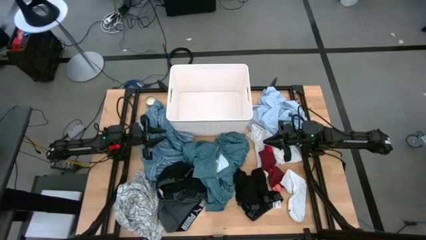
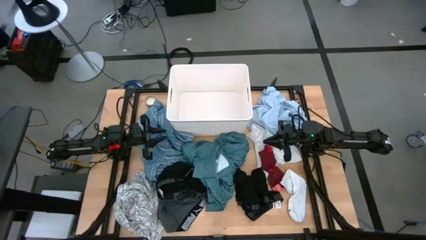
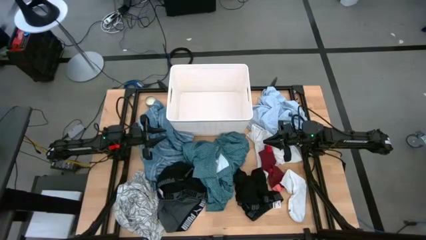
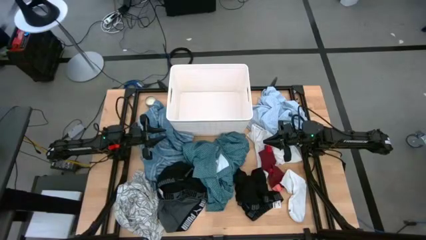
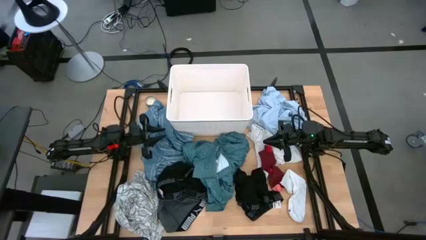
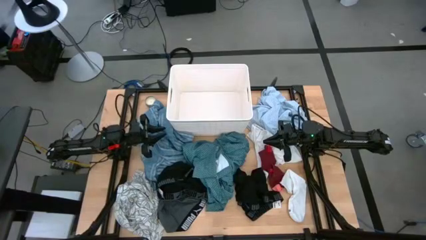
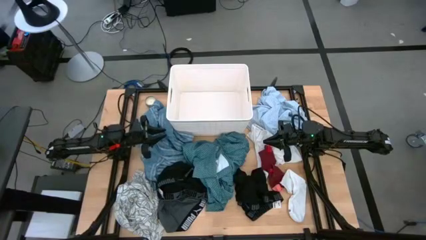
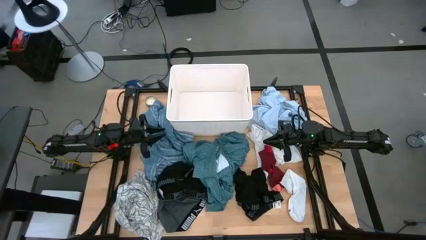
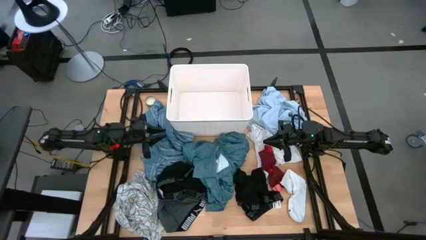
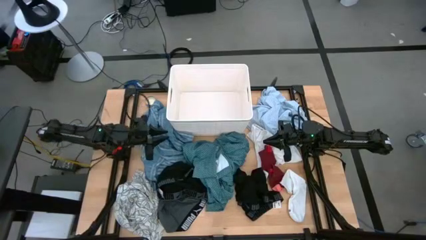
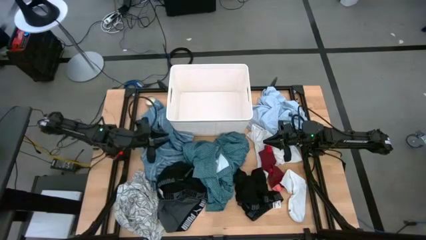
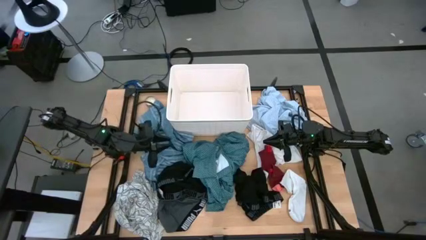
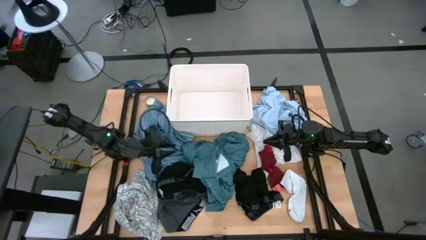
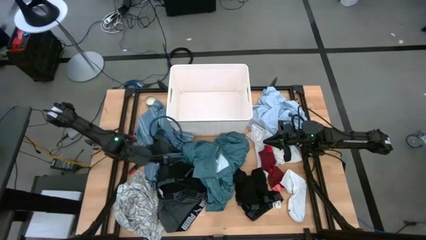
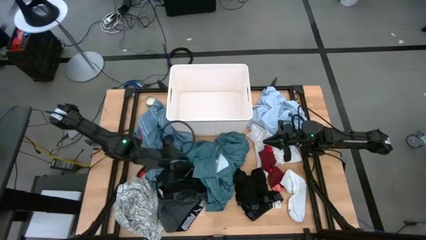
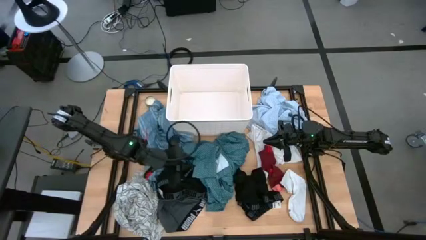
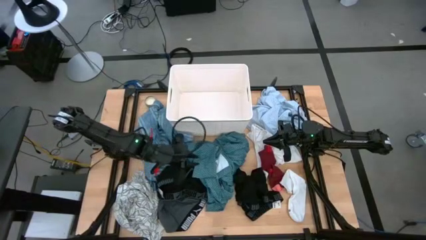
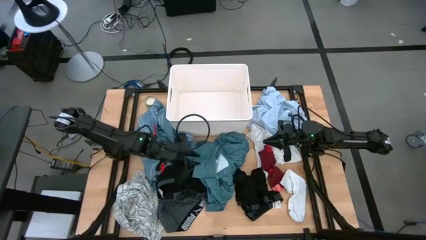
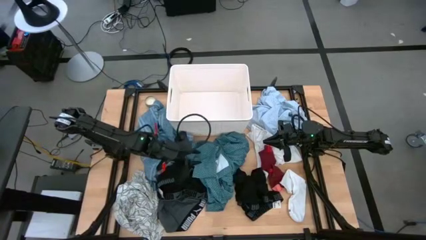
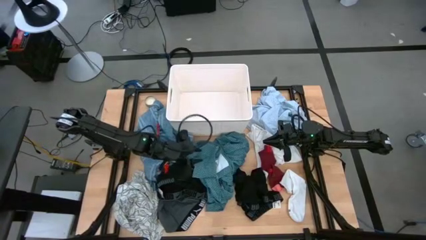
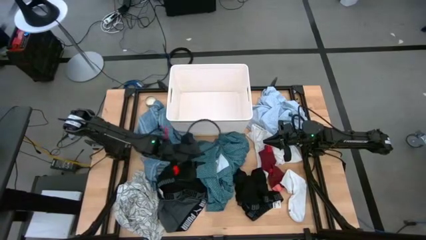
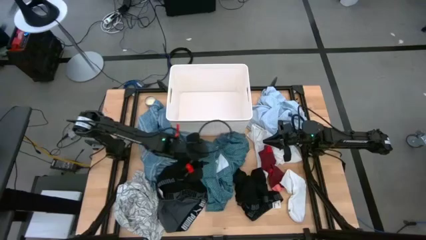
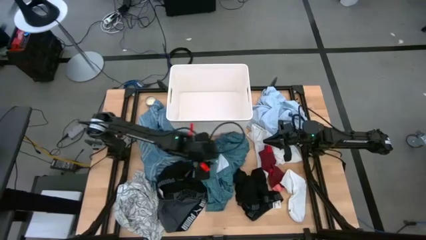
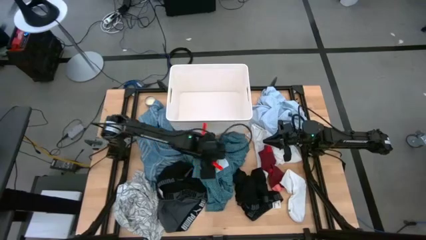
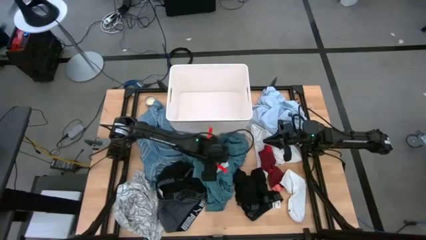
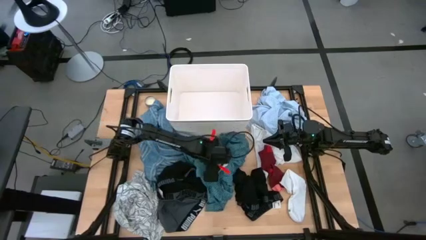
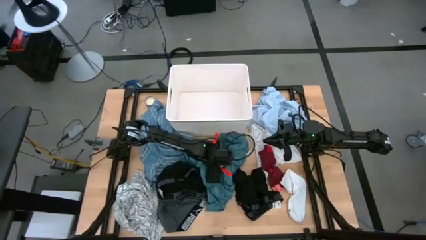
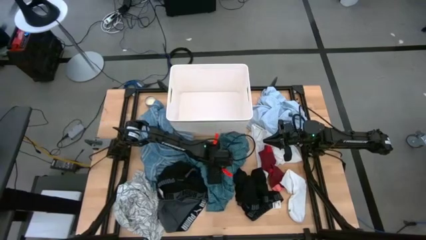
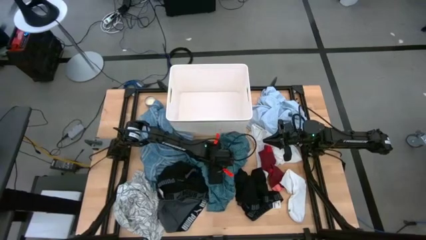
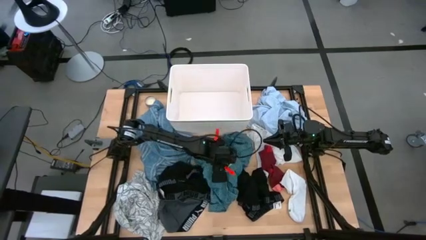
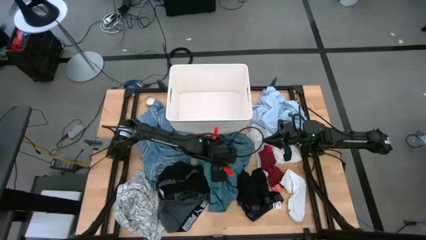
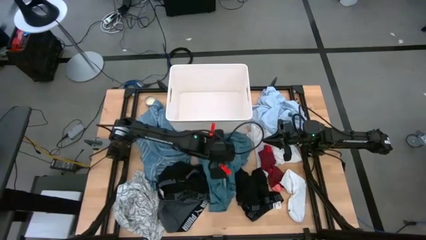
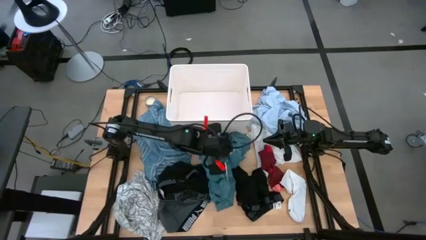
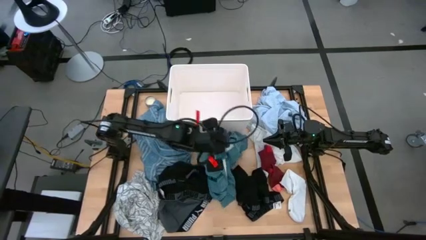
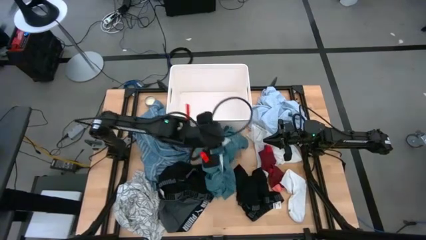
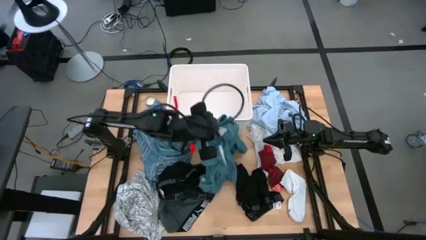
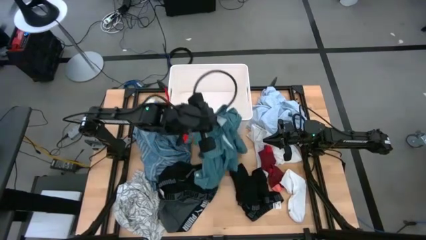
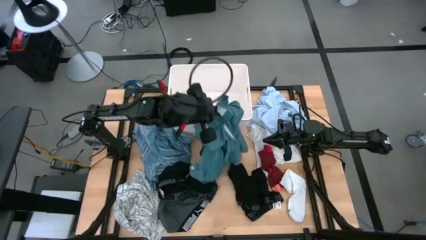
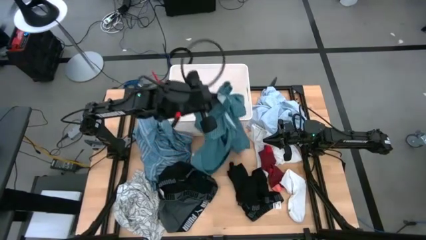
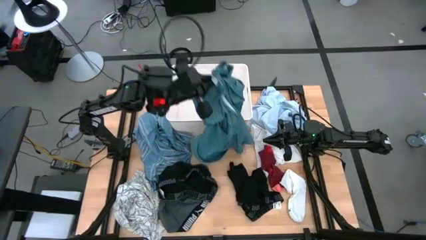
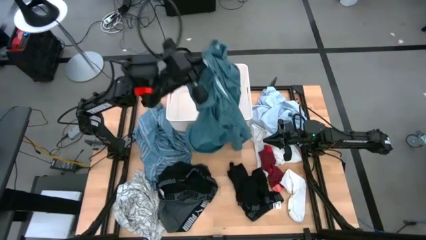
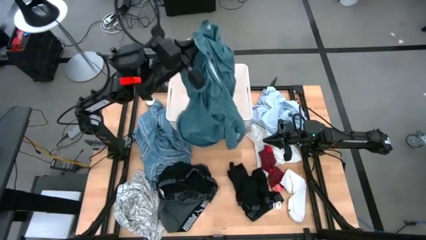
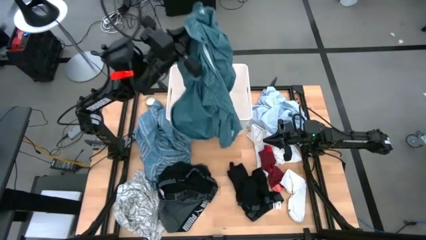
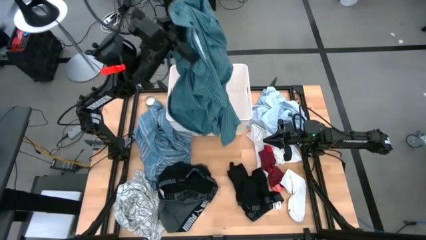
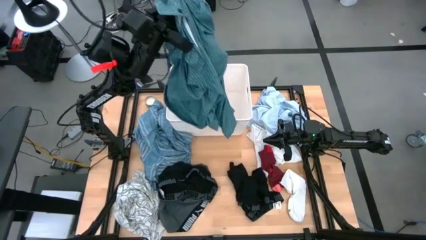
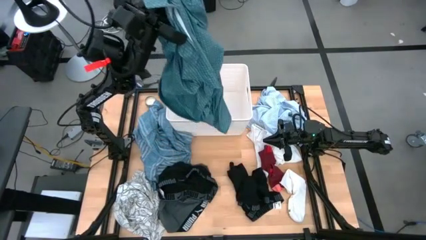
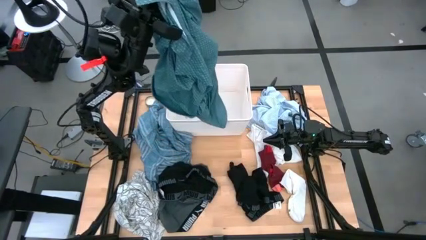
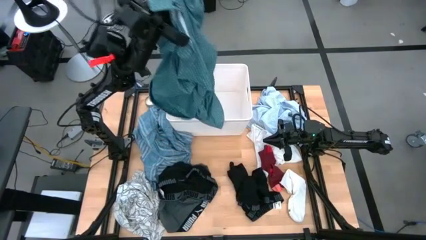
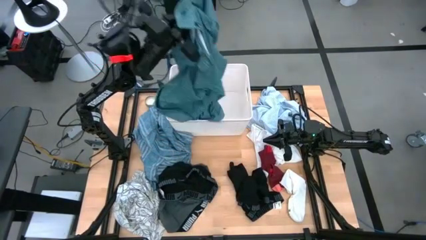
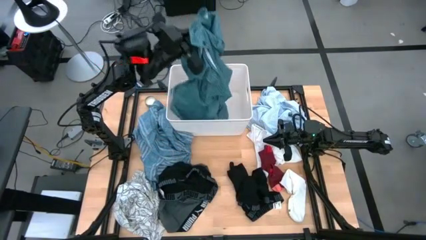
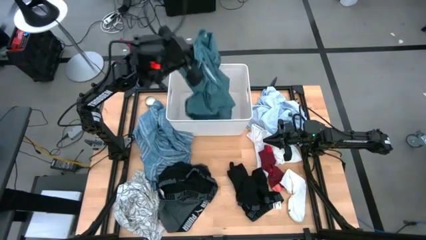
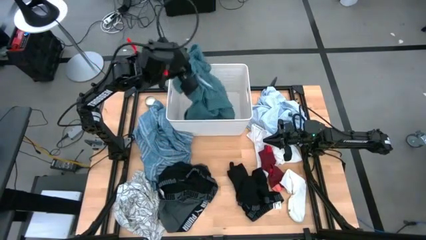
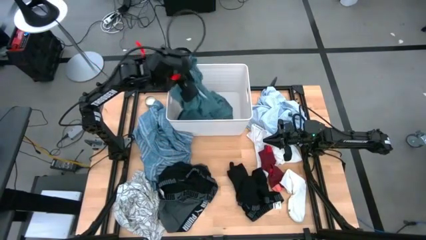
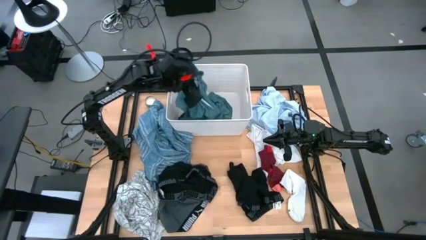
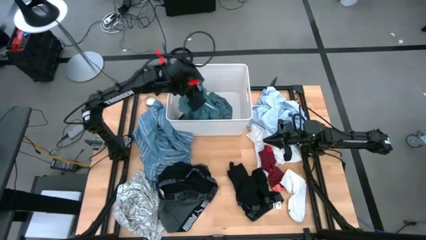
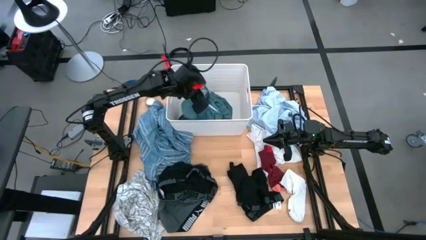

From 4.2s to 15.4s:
Task: Sort clothes
Put the green polo shirt into the laundry bin

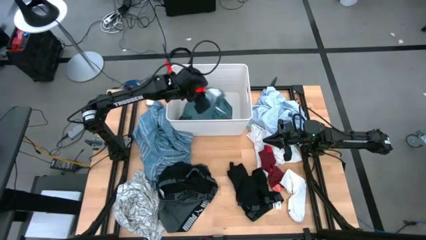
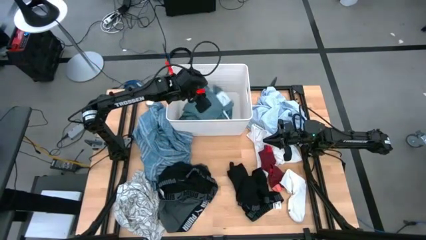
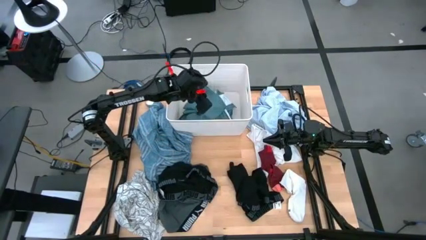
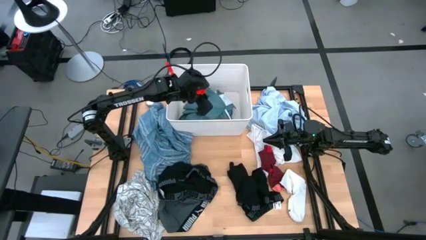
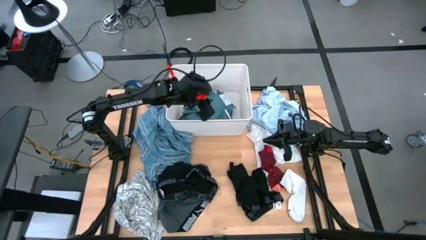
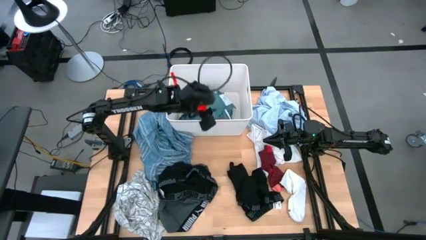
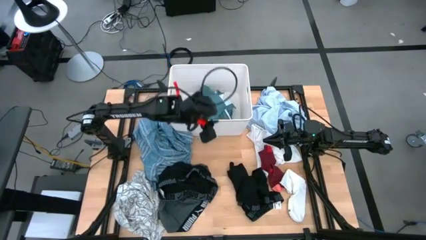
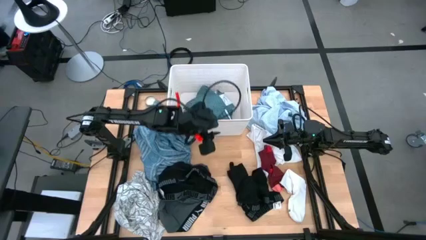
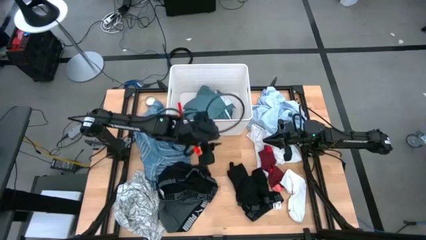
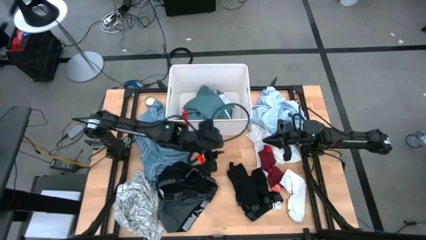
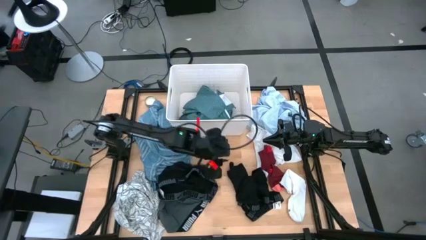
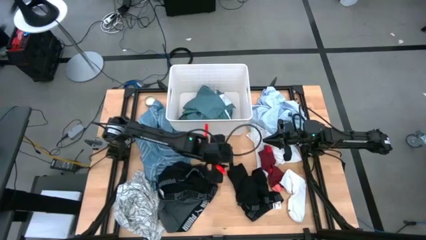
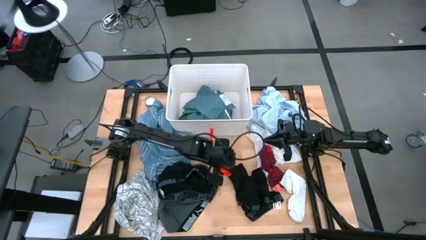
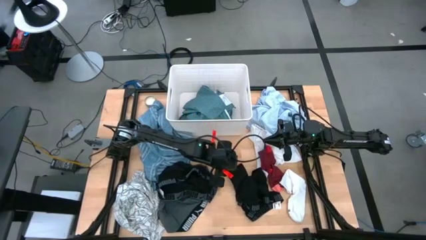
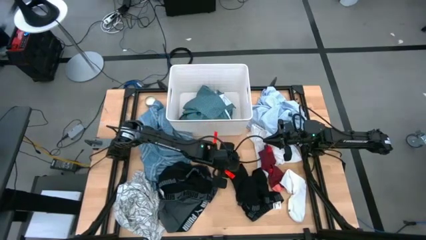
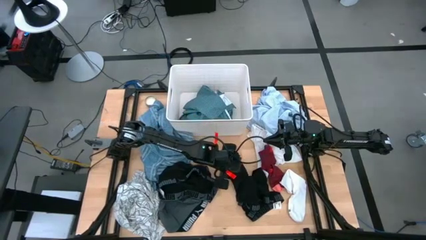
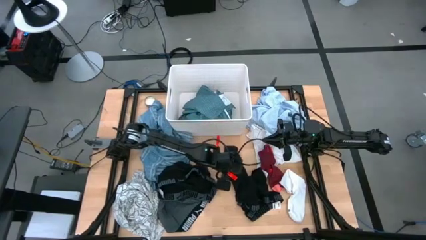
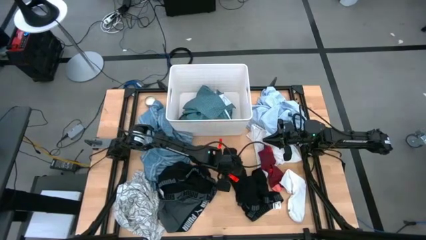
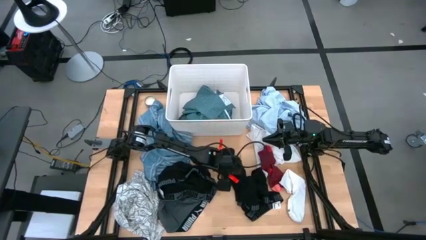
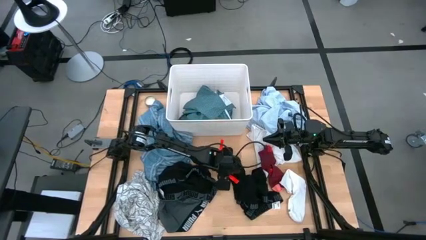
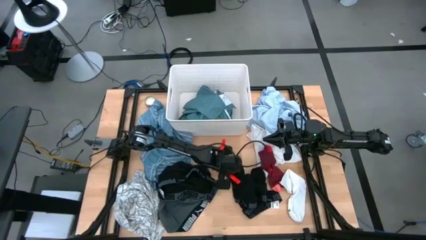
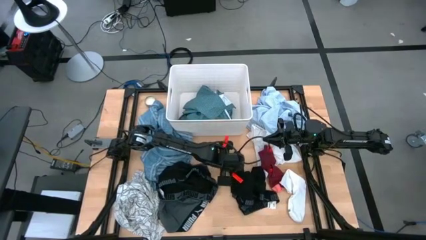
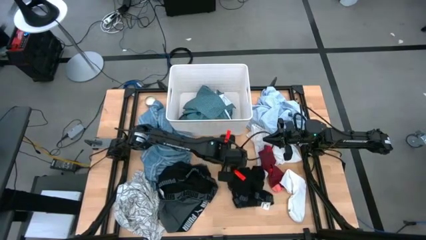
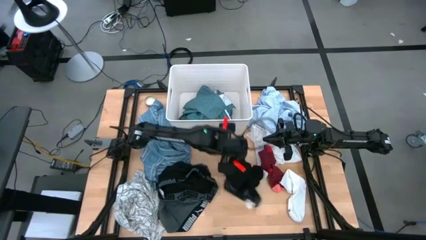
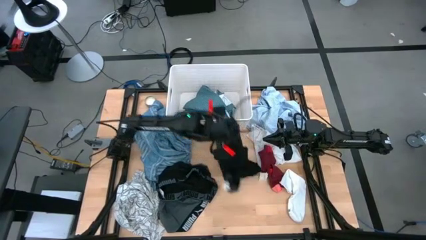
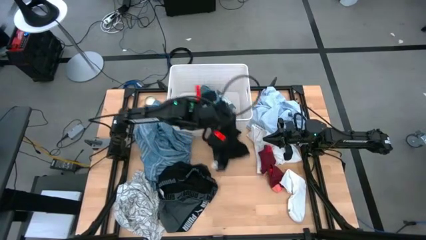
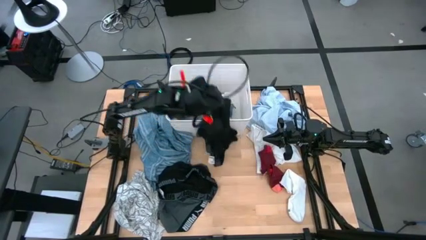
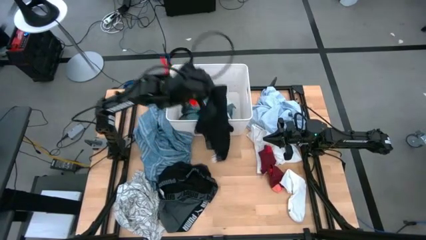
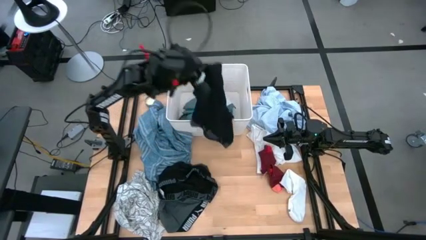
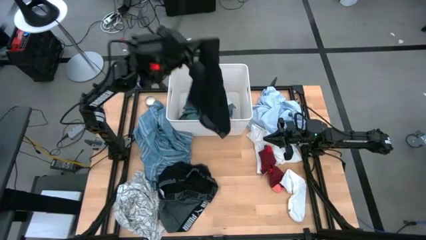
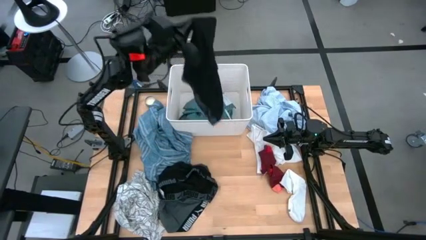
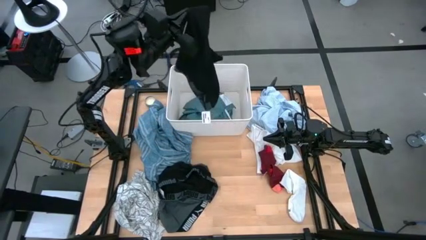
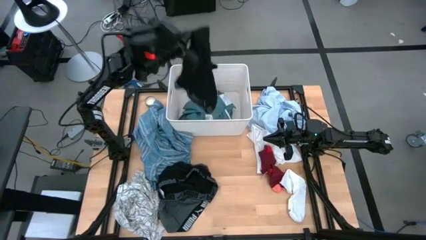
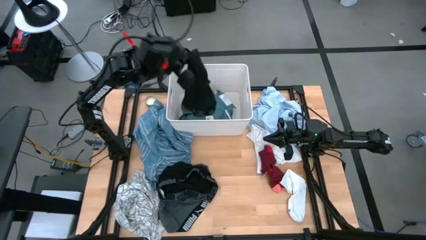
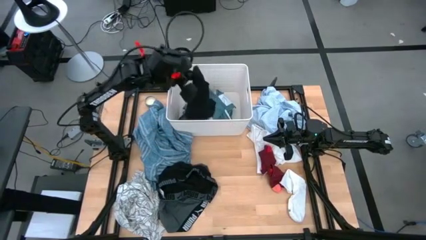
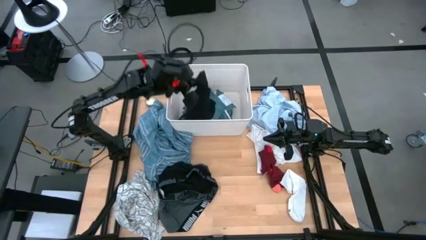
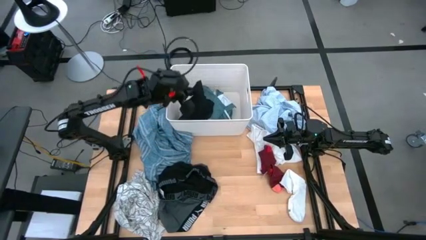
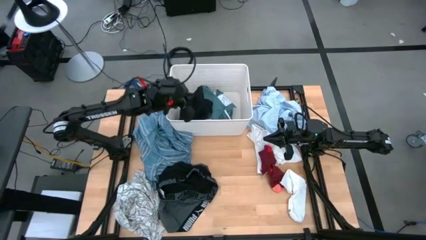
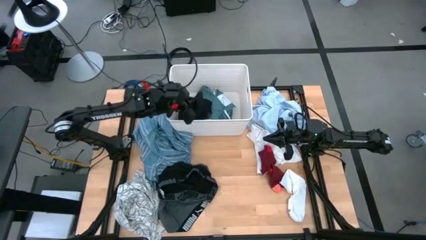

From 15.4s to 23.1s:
Put the right black boxers into the laundry bin
